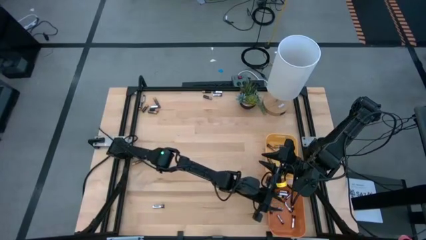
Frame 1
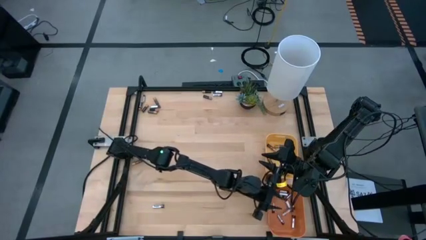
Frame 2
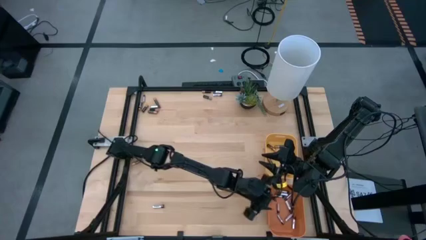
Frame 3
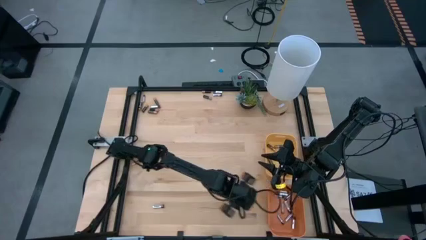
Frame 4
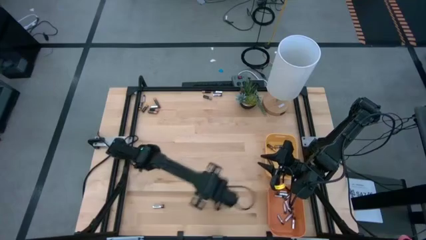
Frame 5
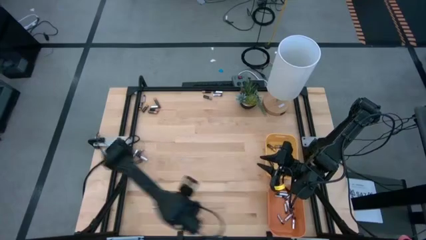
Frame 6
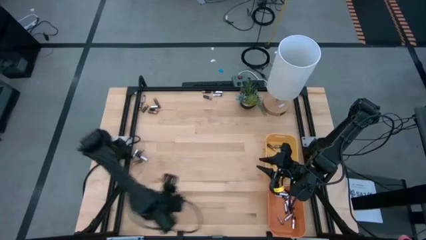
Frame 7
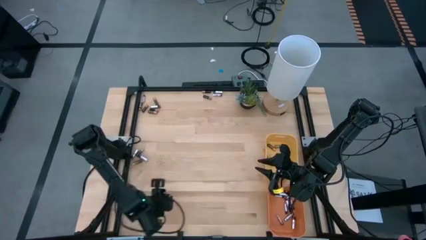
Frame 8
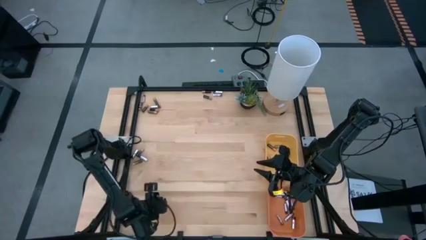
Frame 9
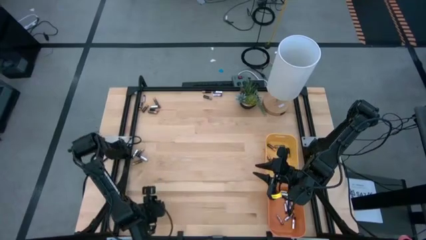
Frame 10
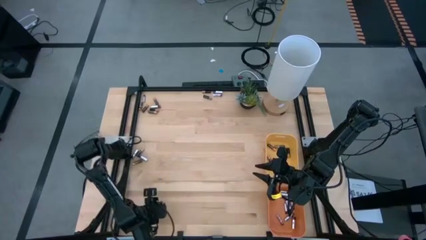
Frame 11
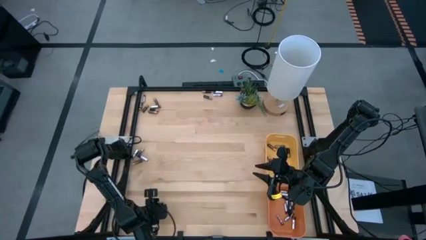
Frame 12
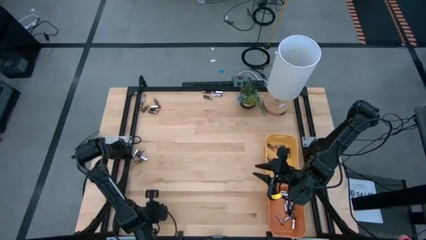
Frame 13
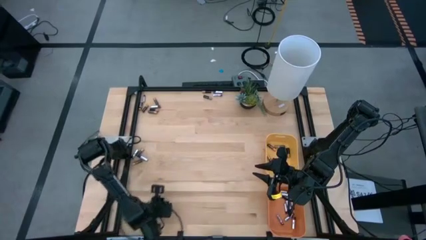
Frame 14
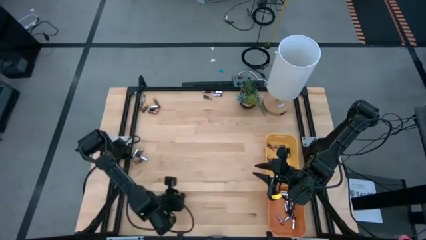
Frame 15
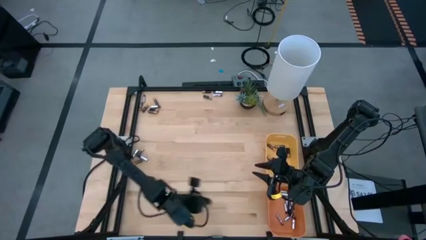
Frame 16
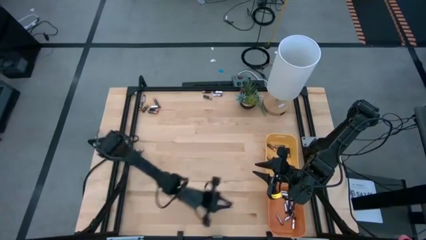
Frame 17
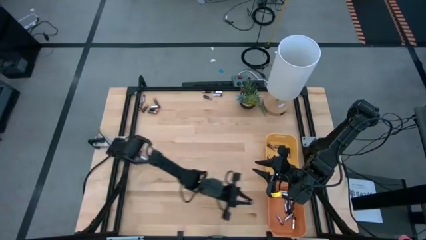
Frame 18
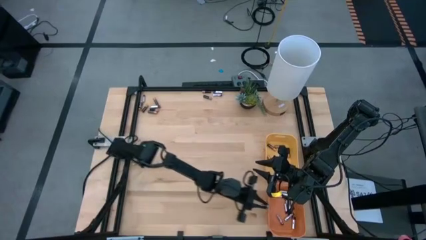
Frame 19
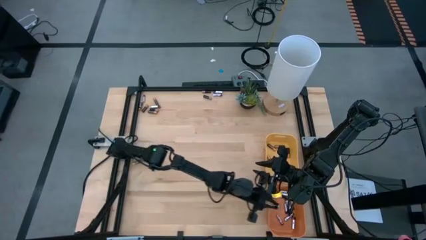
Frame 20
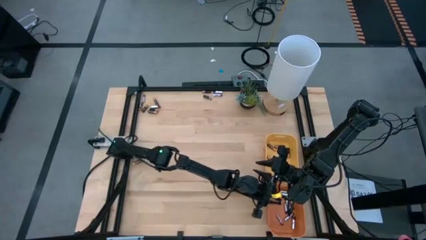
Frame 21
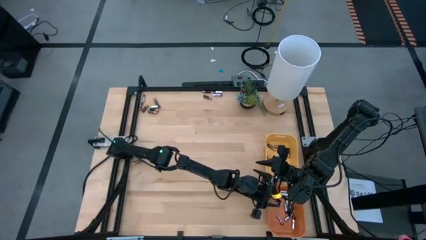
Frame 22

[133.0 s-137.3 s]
Task: Sort batteries
Put the black battery into the orange bin

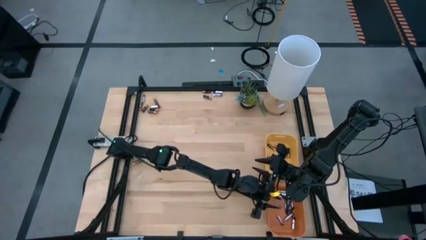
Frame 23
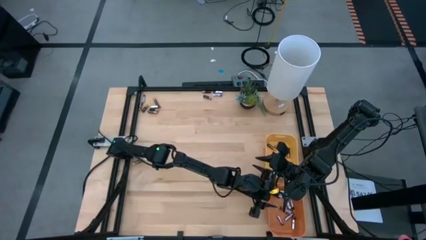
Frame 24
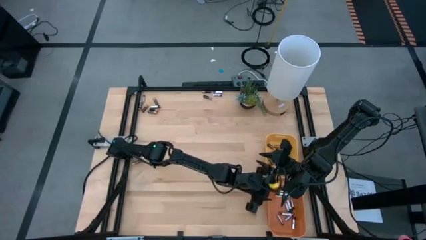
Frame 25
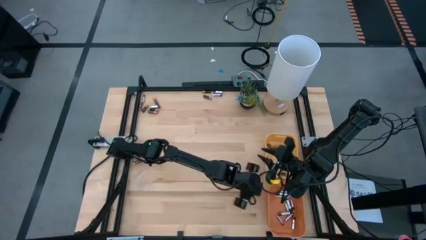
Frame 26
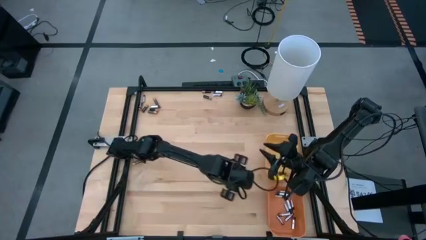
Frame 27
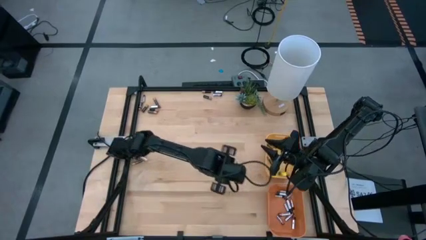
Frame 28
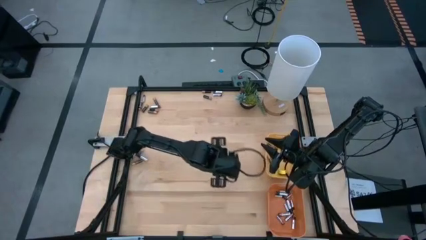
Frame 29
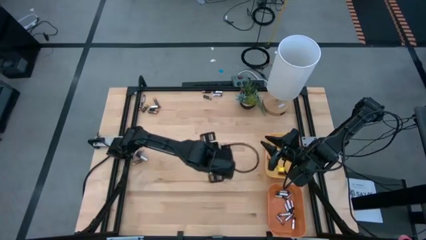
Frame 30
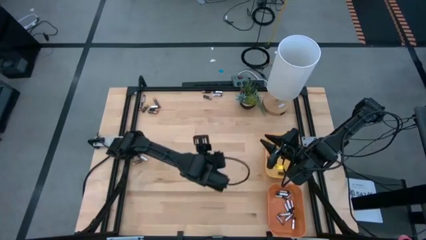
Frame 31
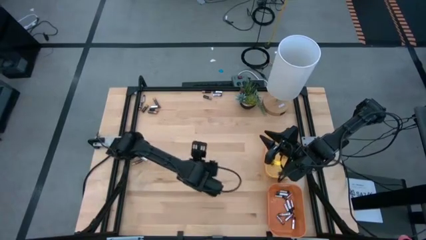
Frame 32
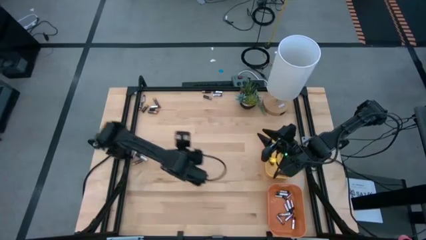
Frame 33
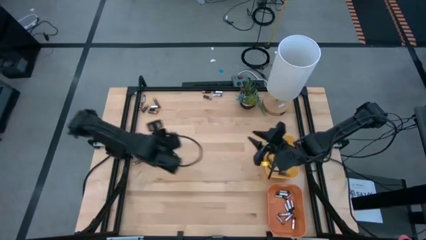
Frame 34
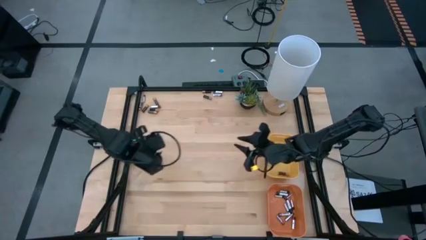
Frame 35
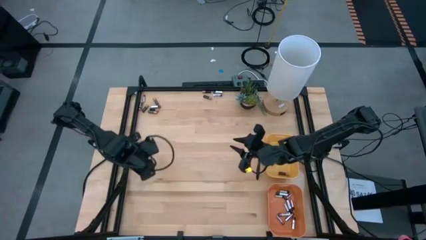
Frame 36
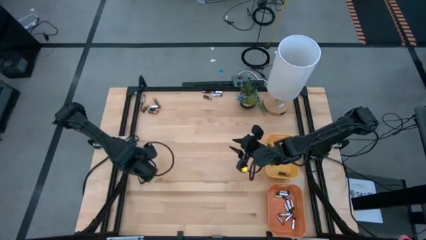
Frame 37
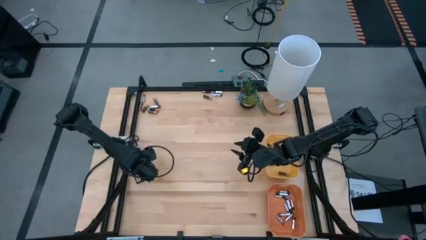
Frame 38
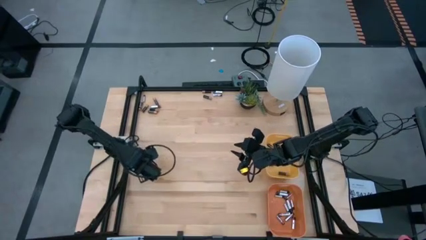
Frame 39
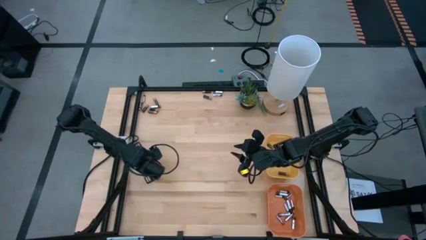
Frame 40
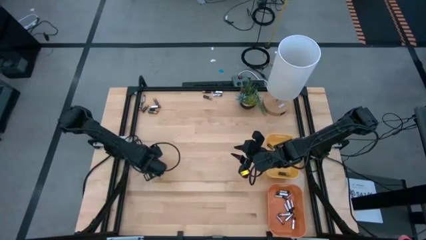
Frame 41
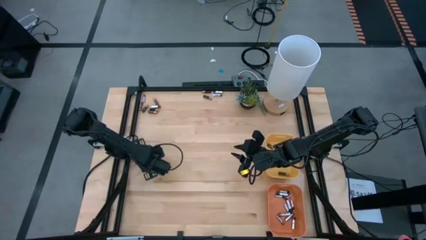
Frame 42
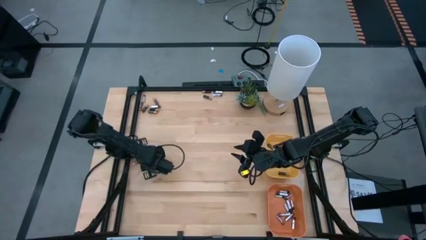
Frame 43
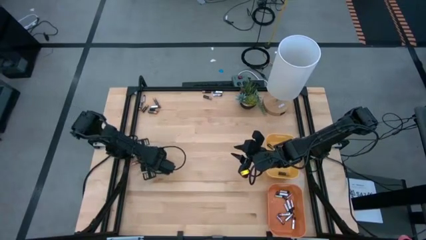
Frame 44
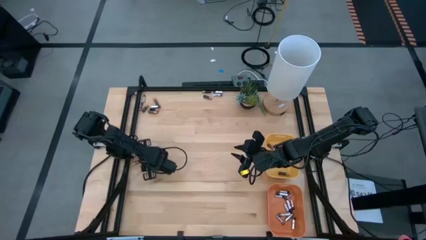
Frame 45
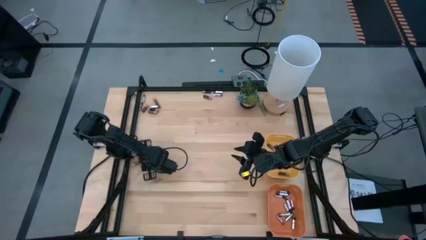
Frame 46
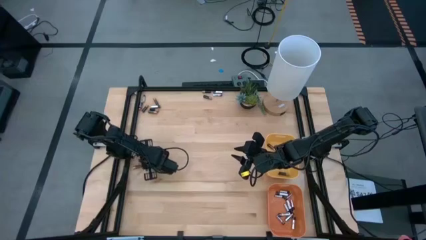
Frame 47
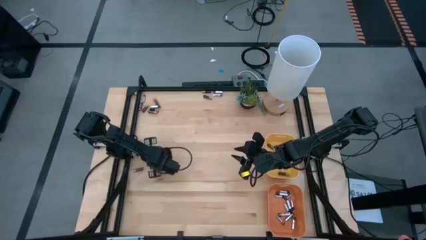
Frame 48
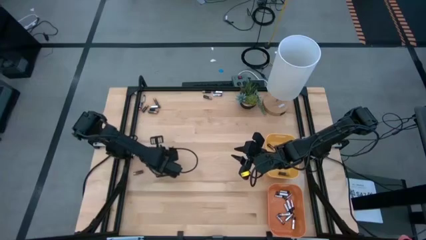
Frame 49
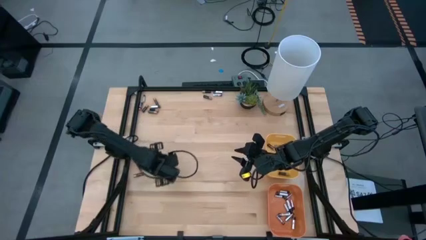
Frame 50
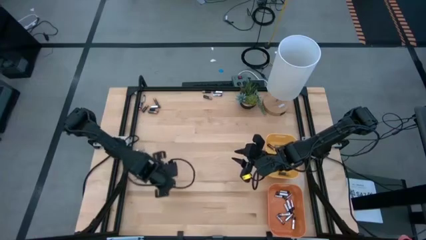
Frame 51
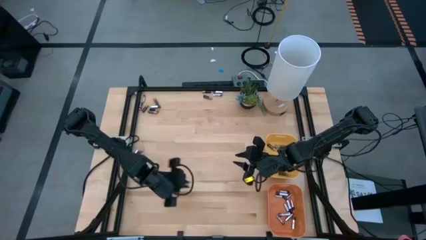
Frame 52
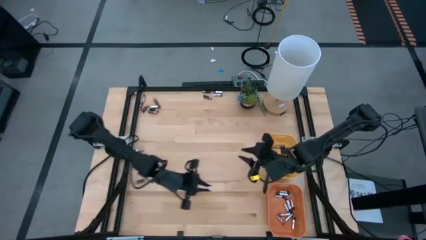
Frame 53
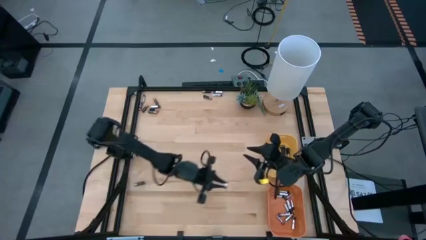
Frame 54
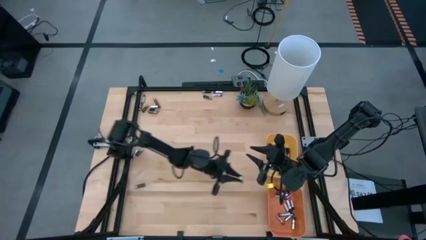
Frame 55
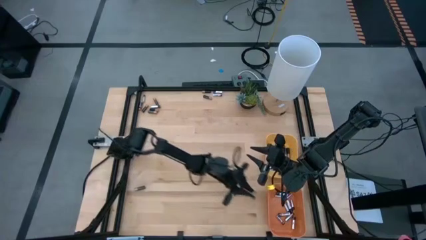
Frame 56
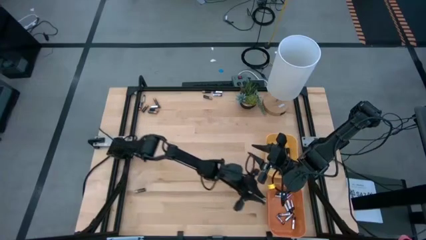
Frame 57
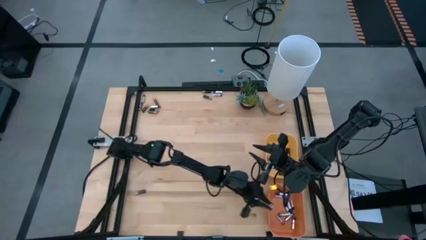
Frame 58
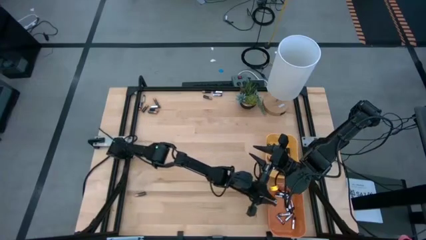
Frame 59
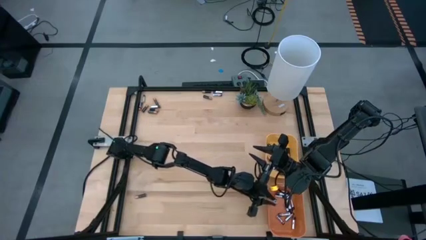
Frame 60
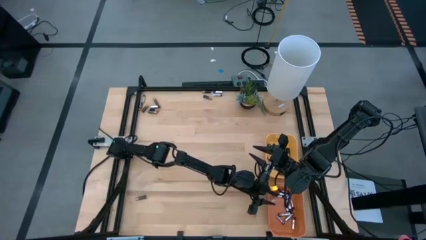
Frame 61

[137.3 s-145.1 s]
Put the black battery into the orange bin
